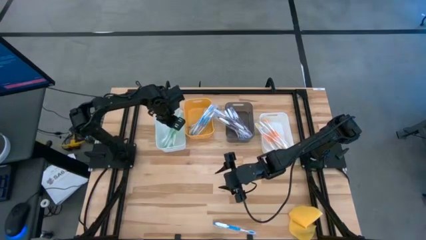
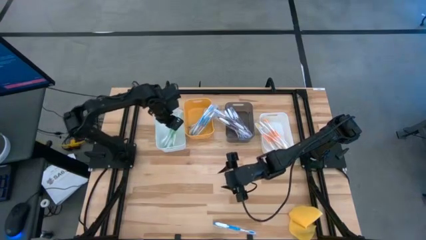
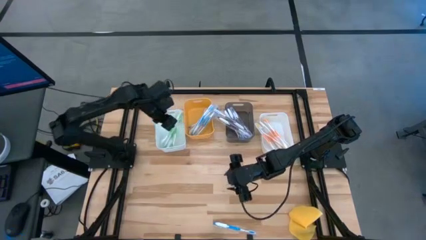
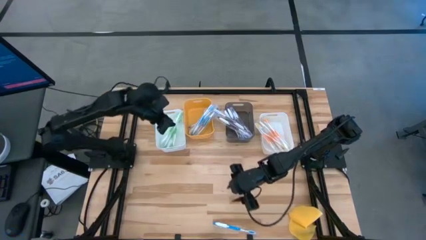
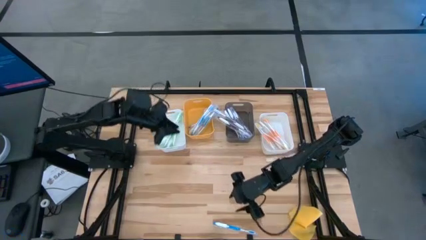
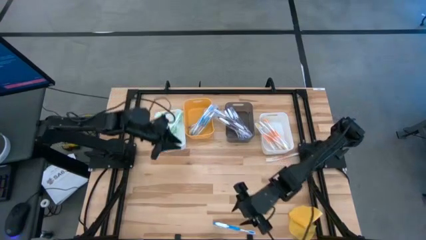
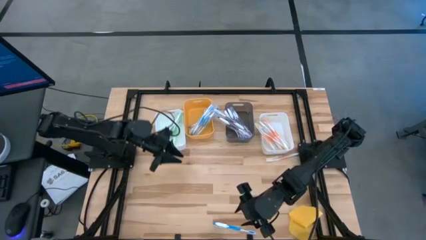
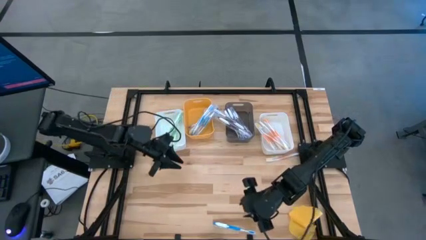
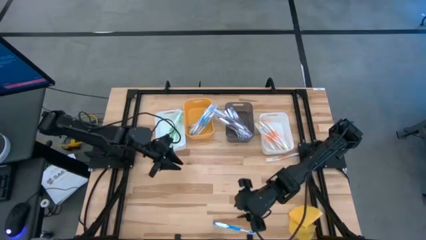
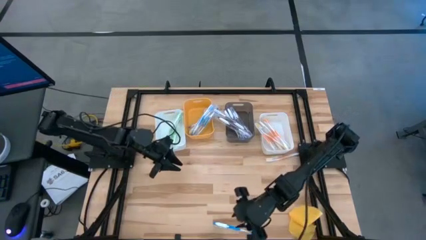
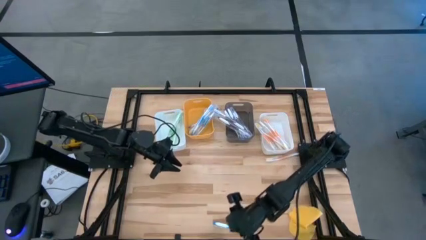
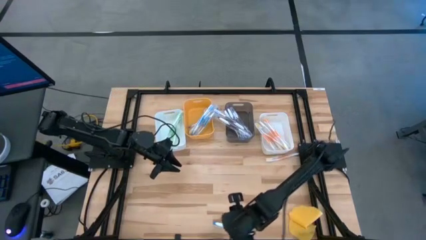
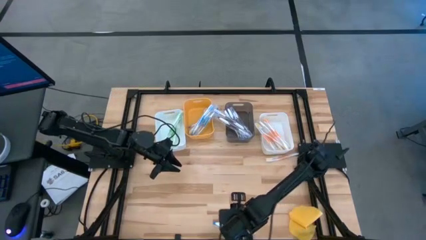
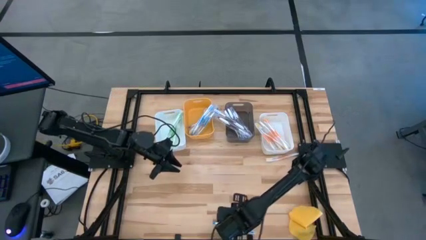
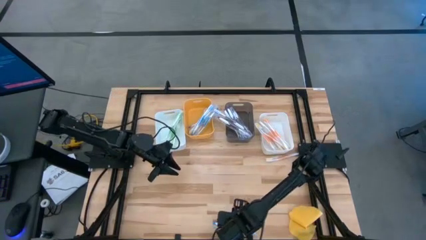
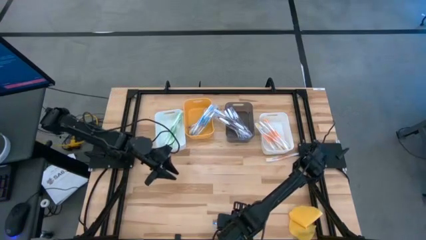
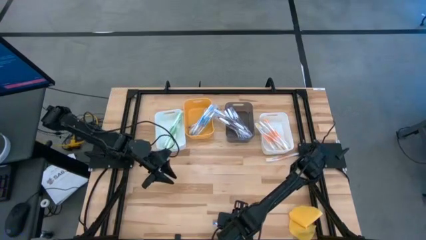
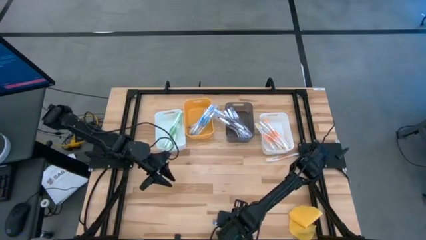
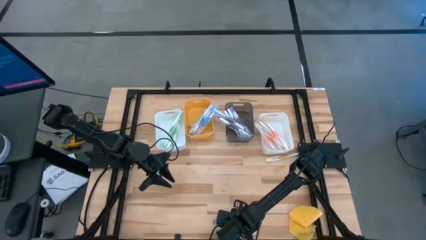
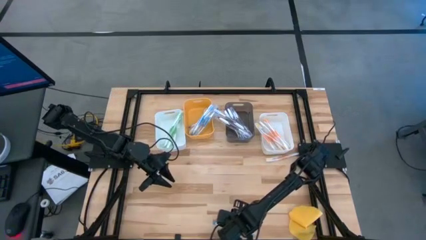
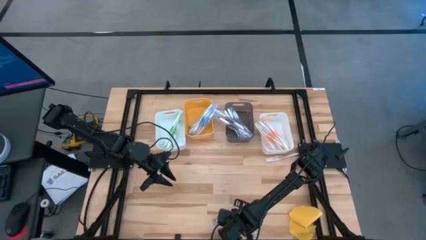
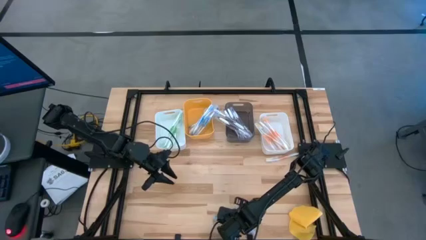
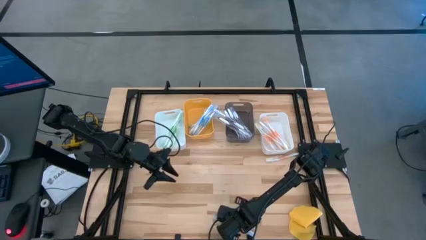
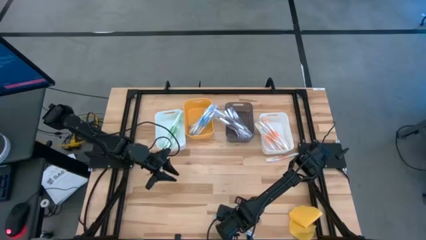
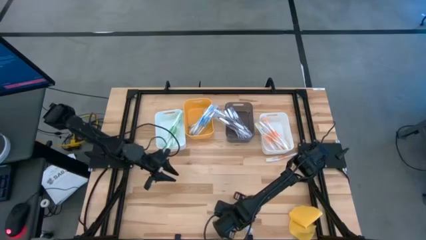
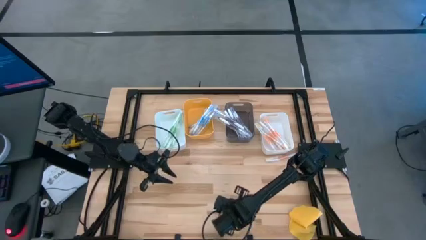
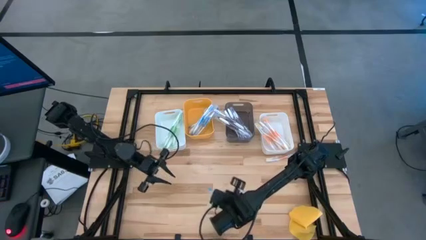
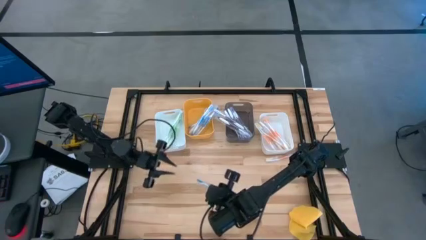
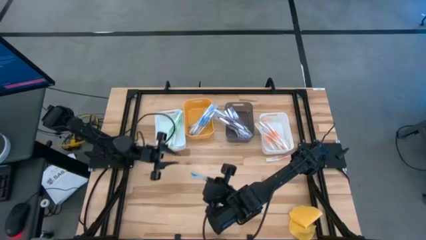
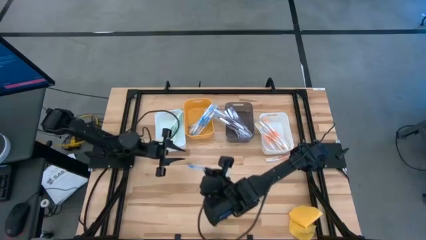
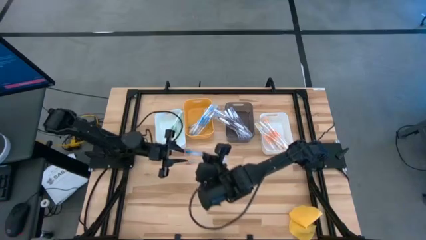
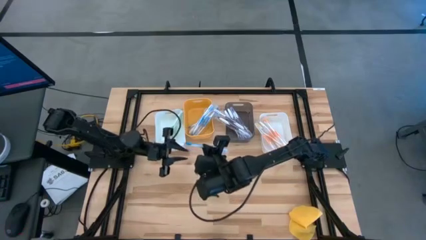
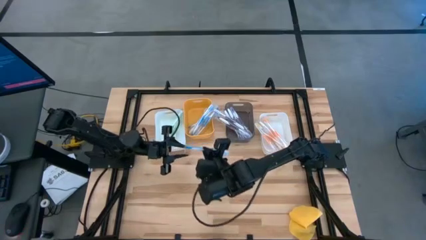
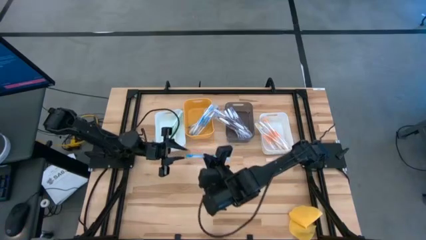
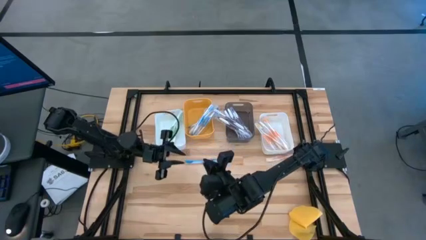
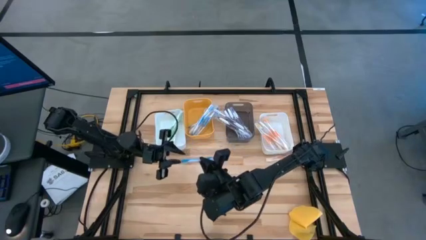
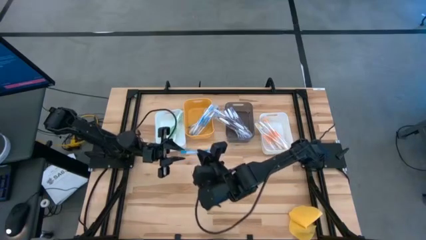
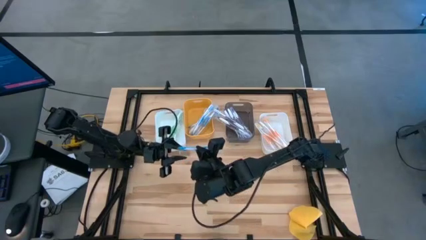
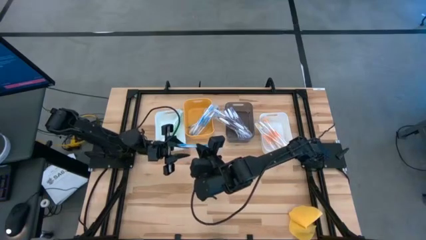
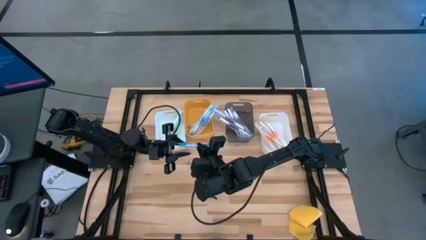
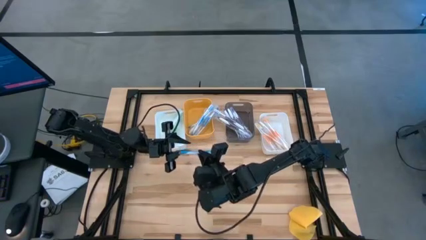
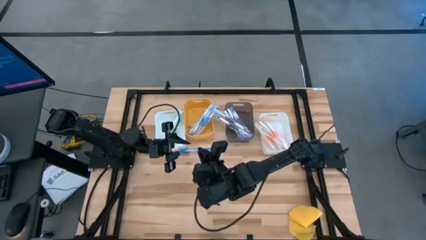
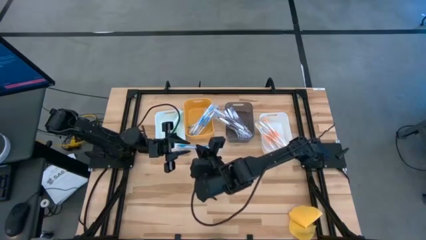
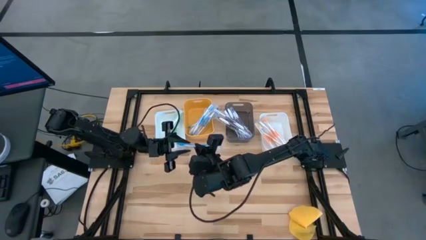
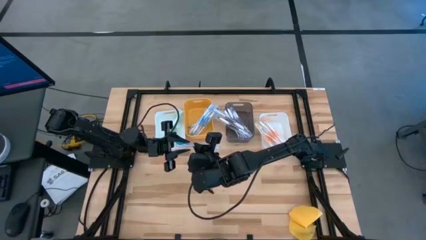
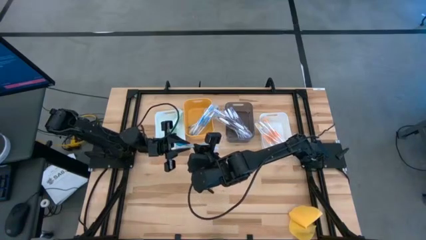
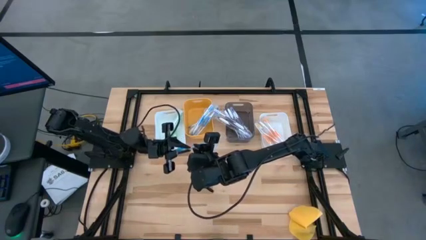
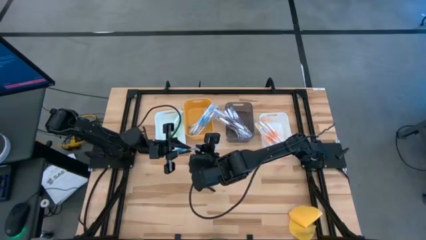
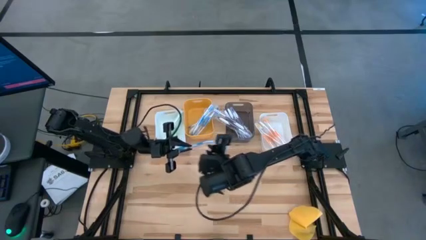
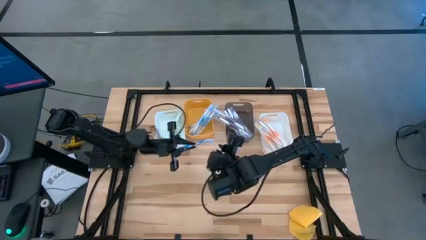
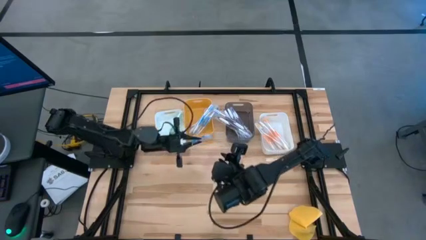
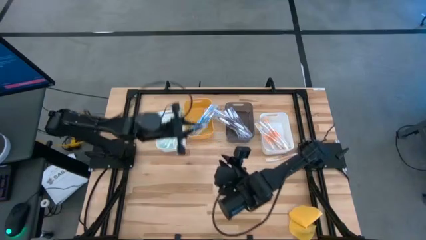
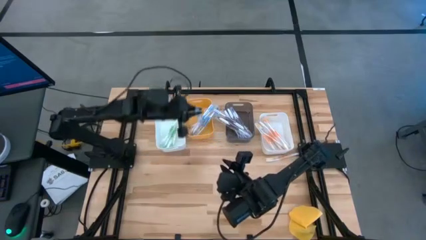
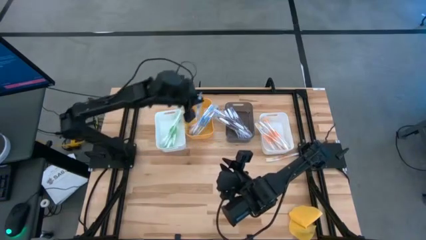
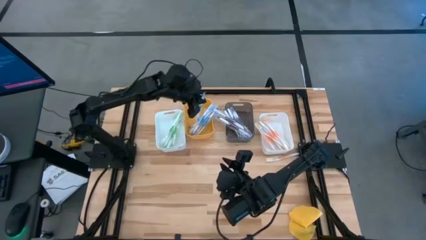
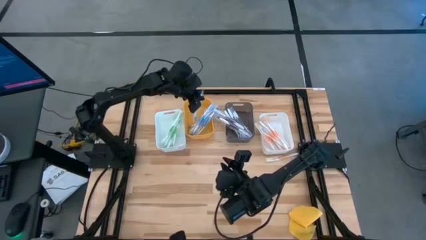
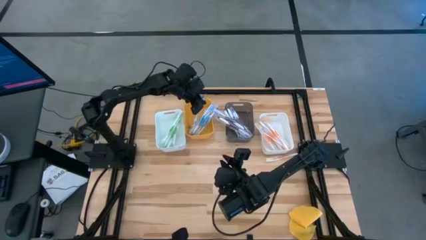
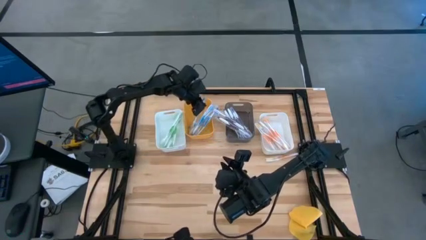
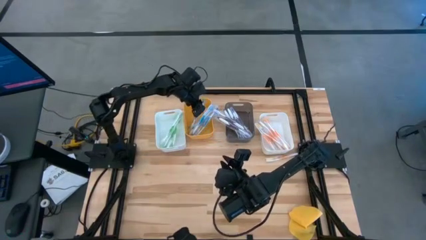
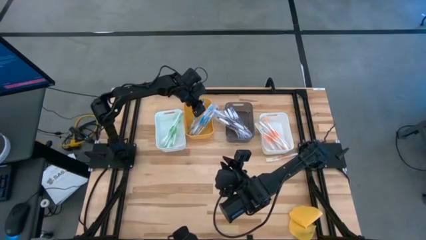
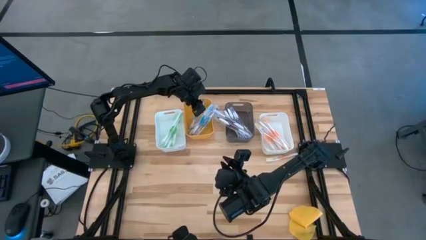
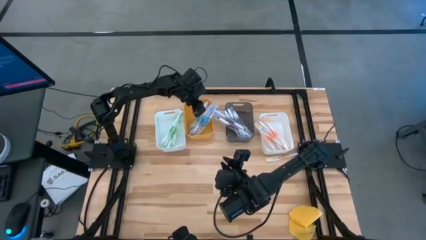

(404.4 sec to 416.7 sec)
Task: Pick & Place Toothbrushes
Put the blue toothbrush into the orange bin

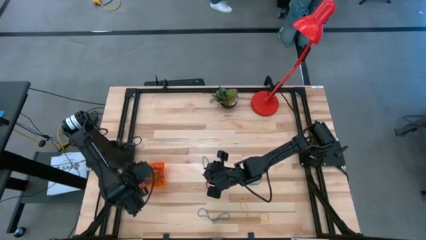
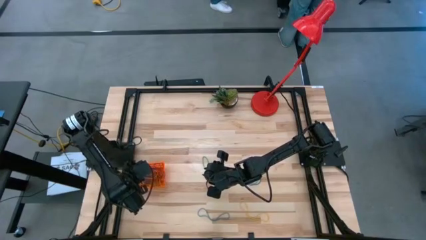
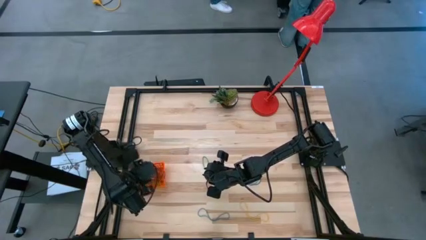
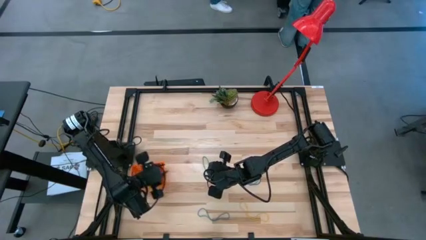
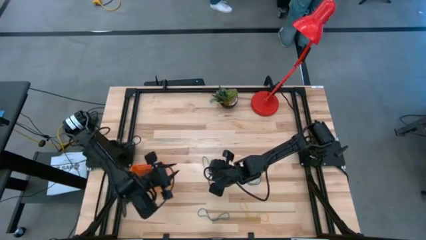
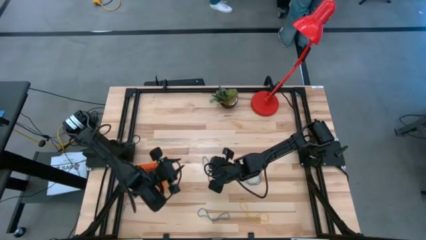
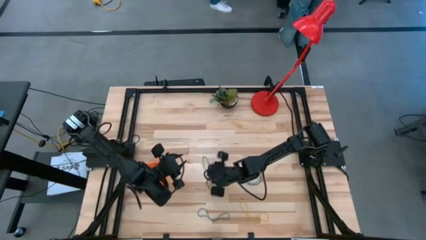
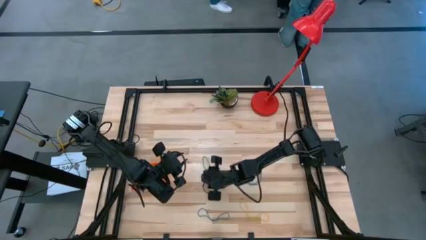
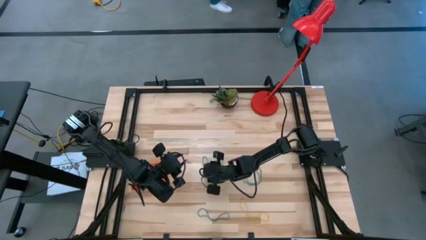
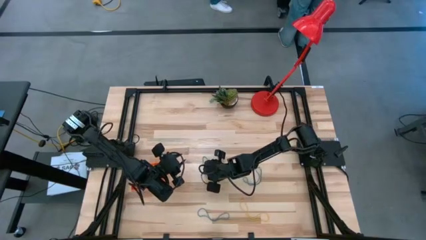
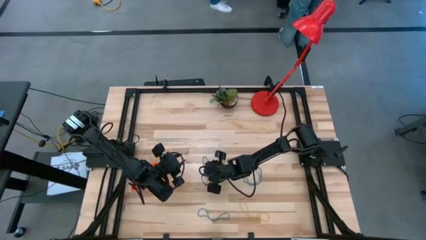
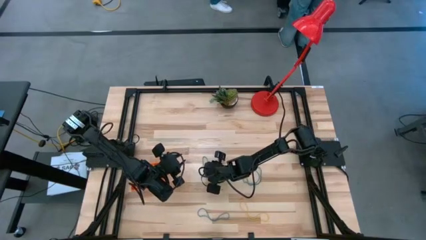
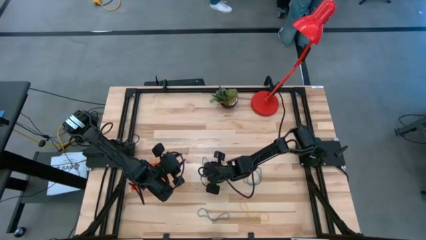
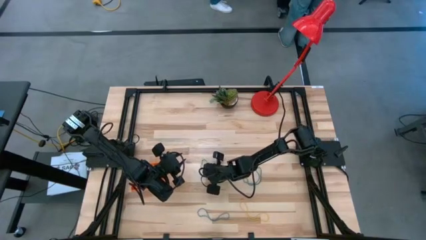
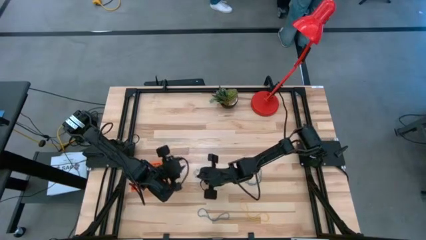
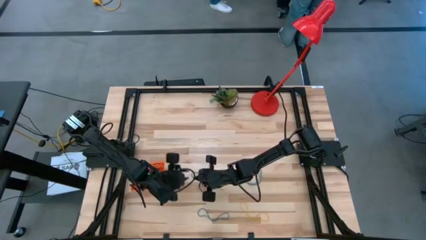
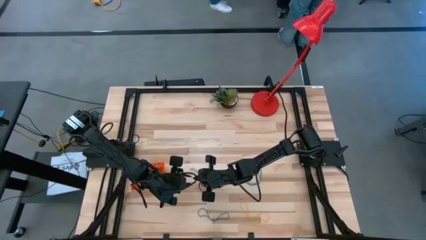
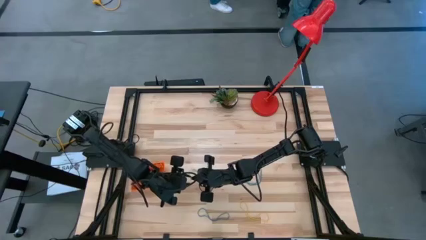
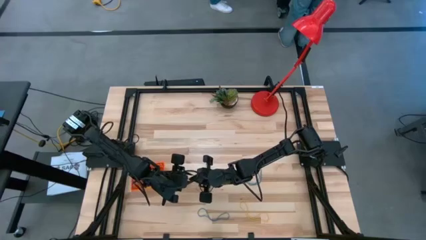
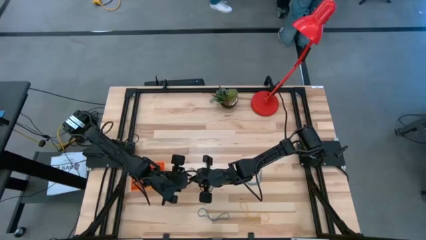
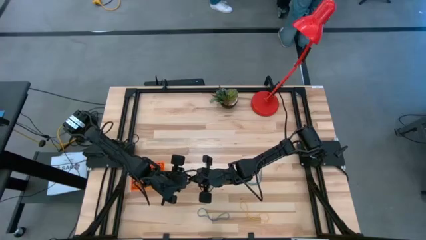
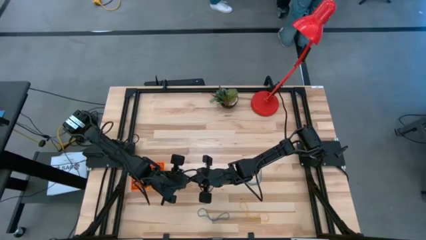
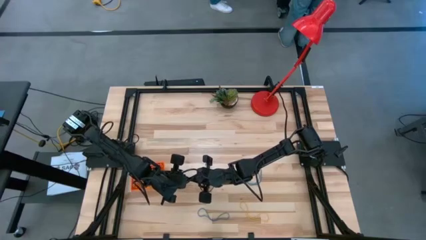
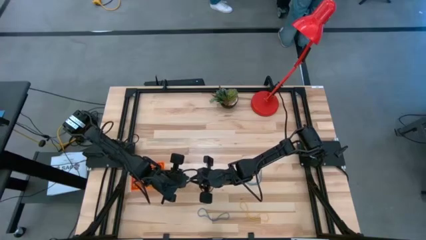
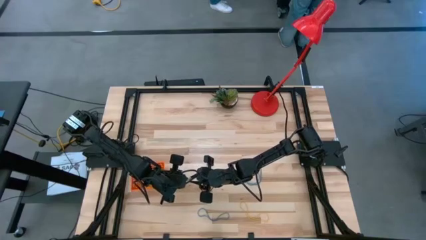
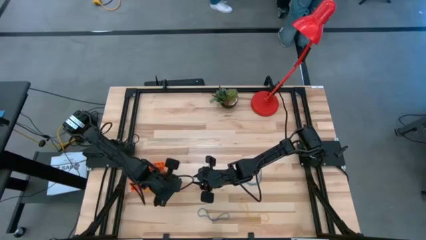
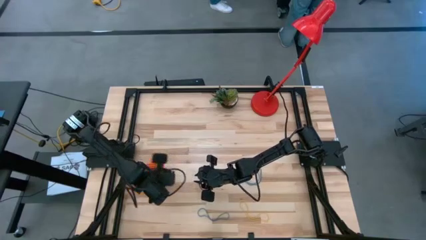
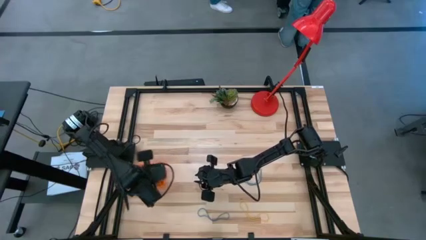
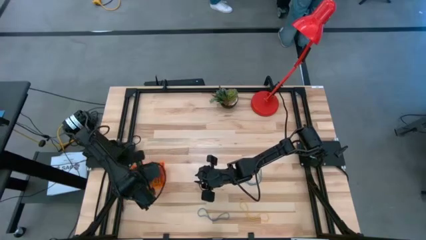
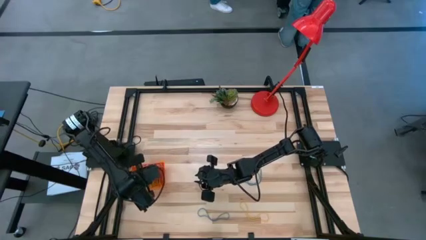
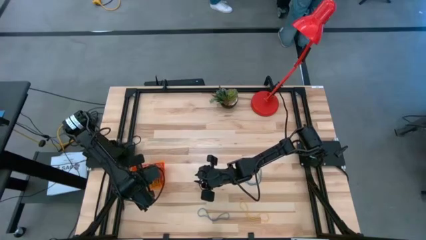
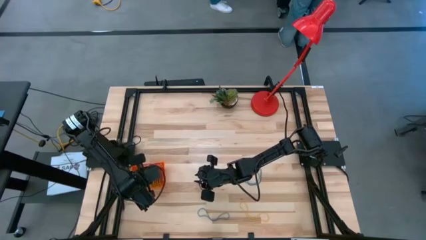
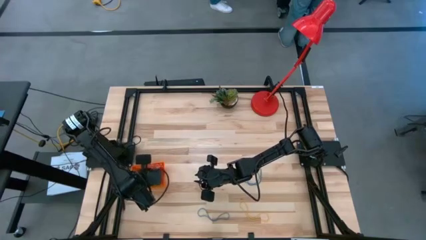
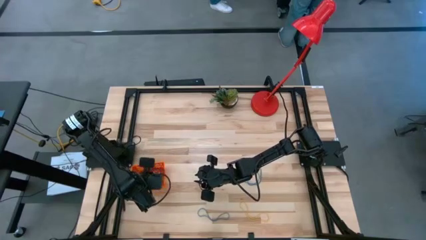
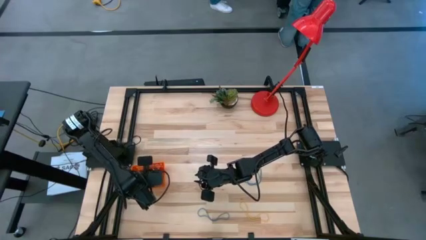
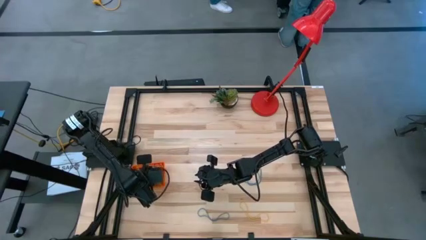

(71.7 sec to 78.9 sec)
Task: Pick and place rubber bands into bin
Put the green rubber band into the orange basket
